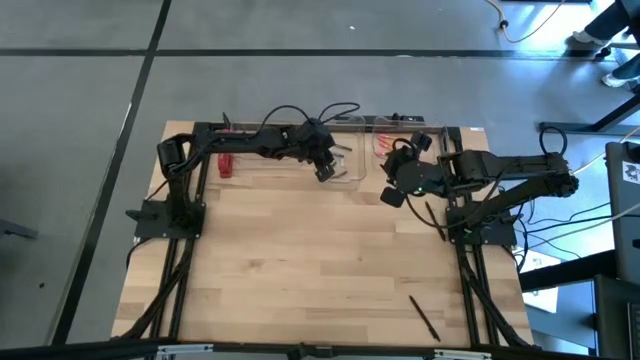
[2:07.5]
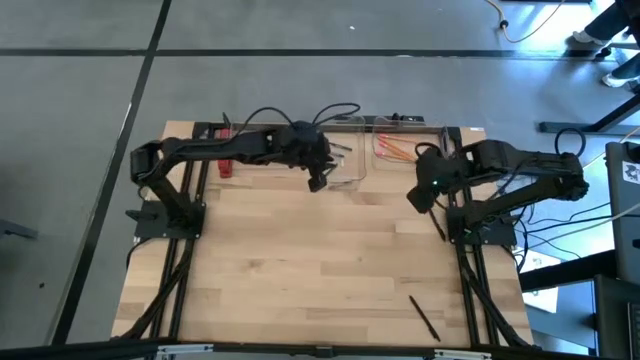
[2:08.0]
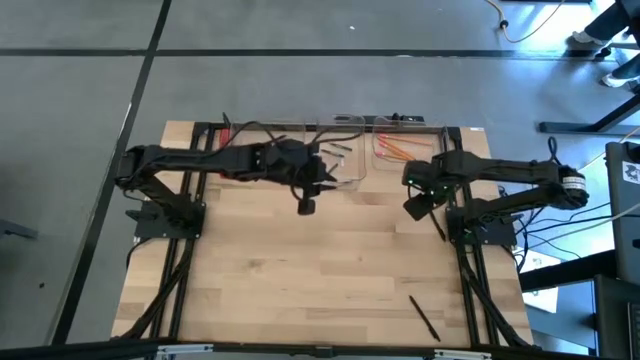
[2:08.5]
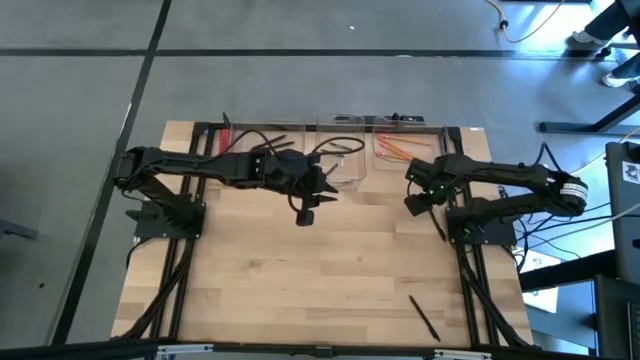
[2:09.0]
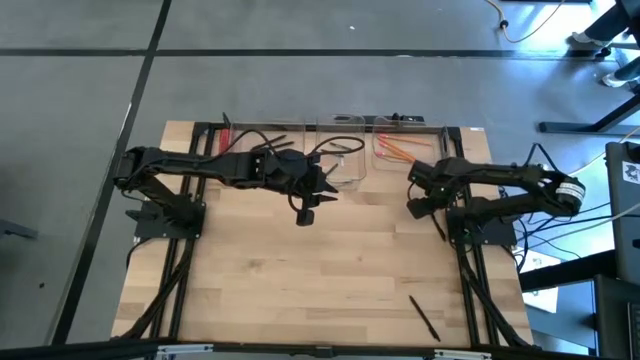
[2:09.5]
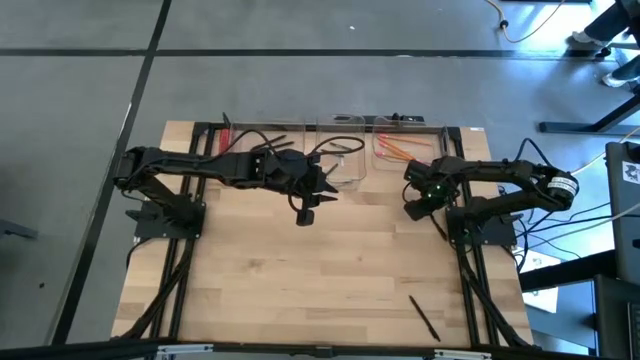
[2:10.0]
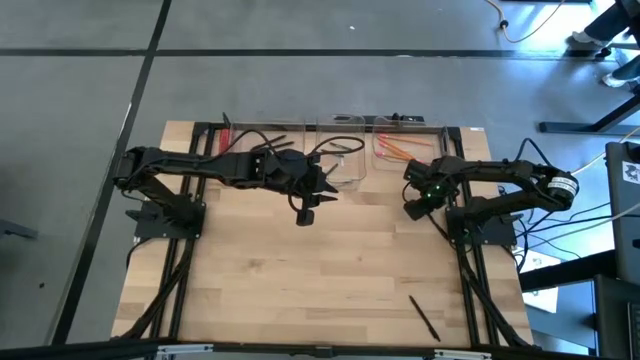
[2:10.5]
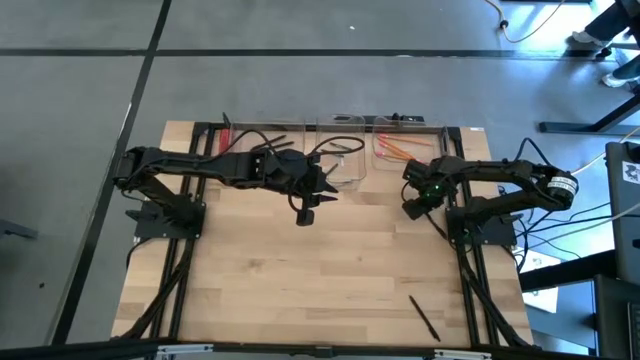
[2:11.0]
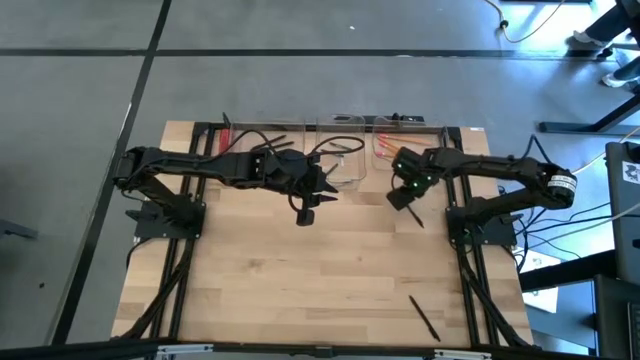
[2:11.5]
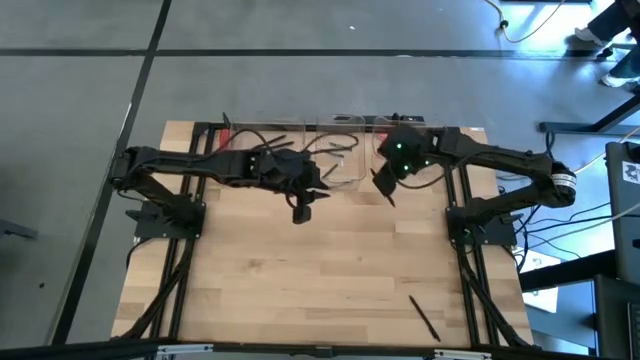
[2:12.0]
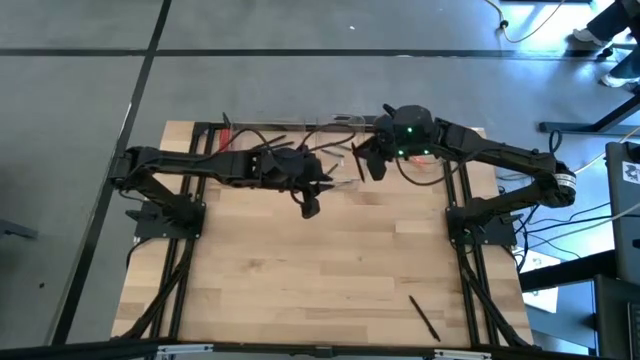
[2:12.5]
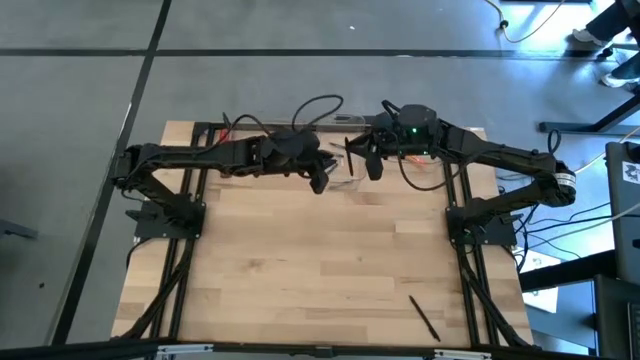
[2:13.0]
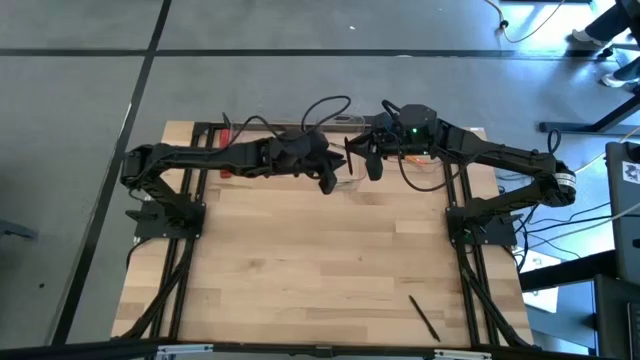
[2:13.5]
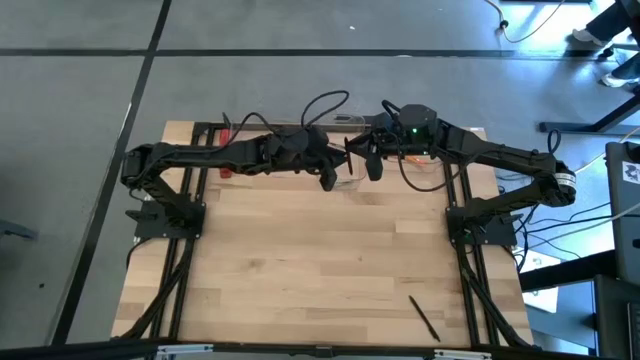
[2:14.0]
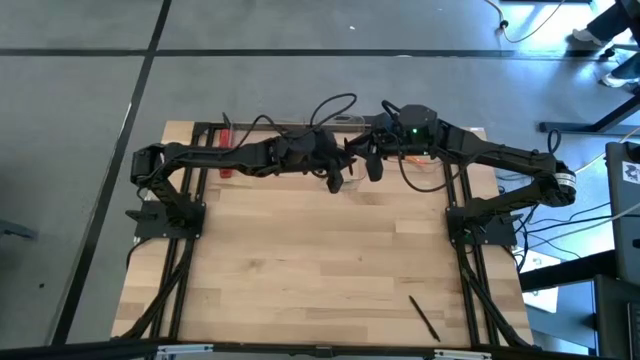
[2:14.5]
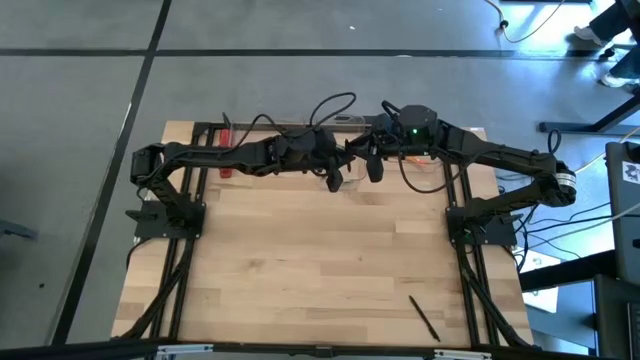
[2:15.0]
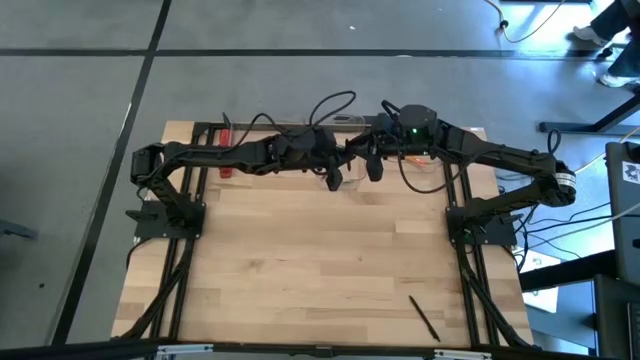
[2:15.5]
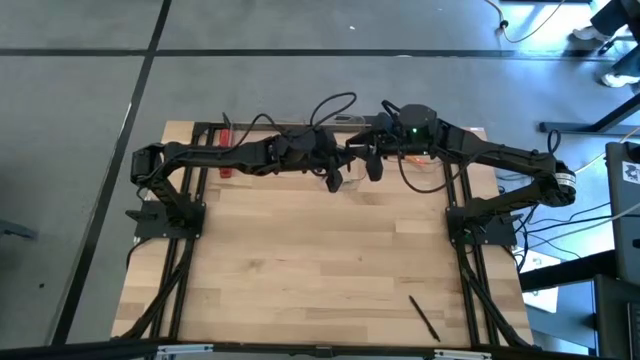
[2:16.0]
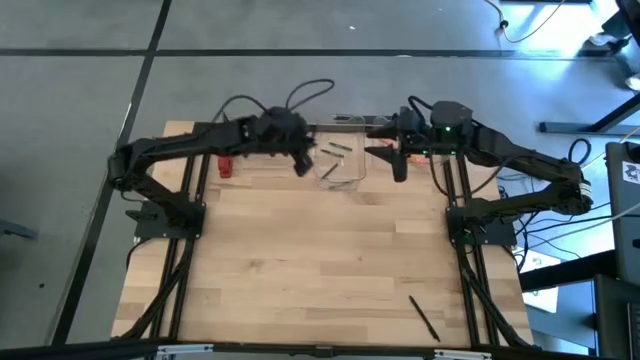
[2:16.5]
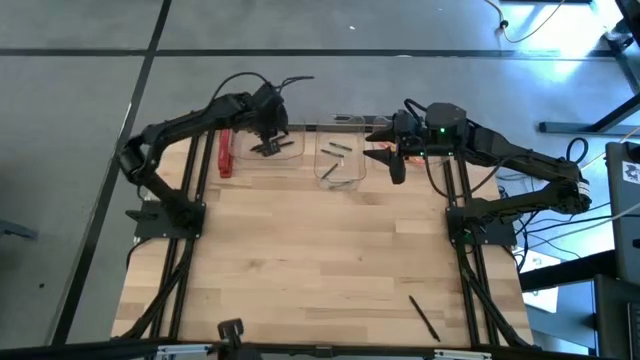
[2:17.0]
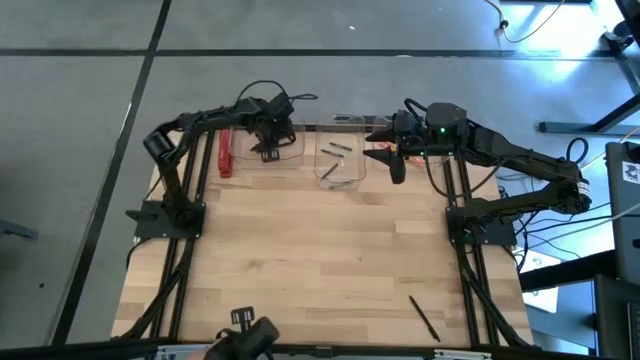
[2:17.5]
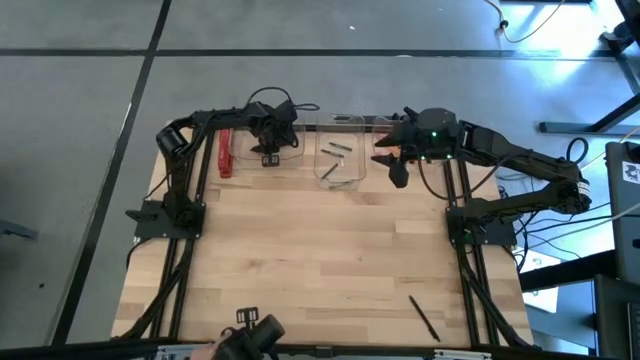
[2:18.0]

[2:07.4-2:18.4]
Task: Sort crayons/erasers/pens/pencils in bins
Put the black pen into the left transparent bin

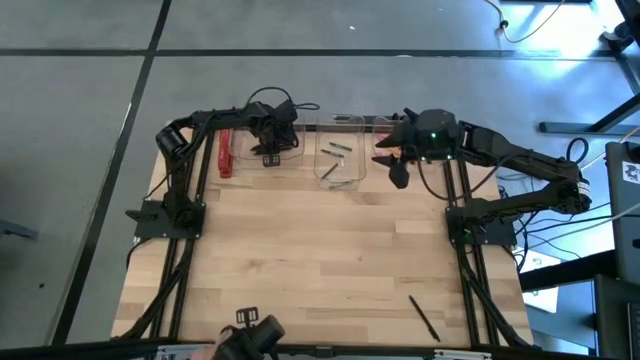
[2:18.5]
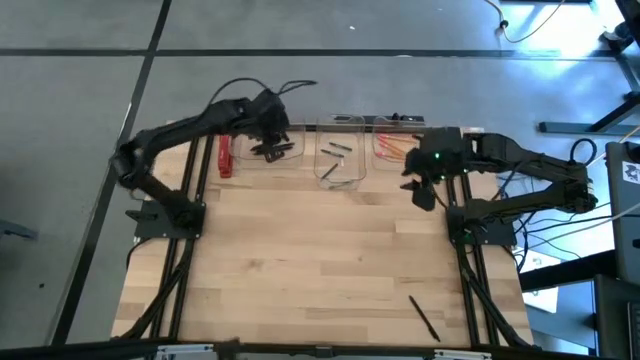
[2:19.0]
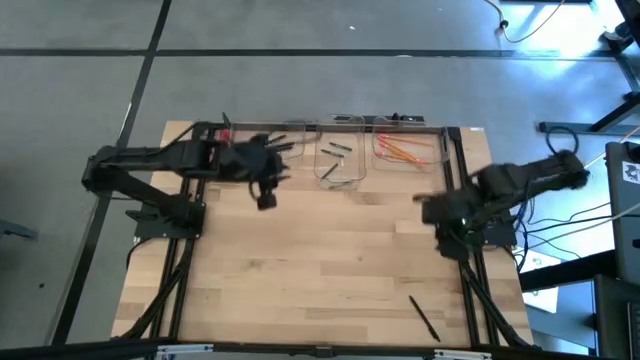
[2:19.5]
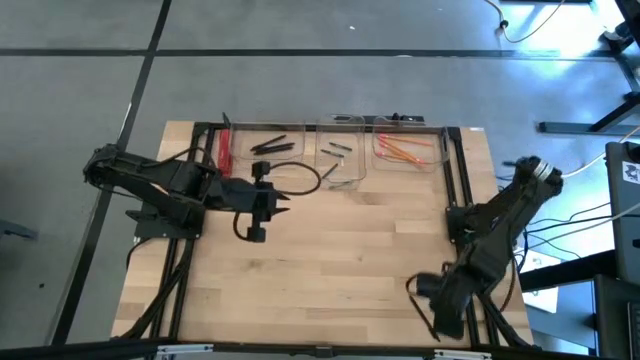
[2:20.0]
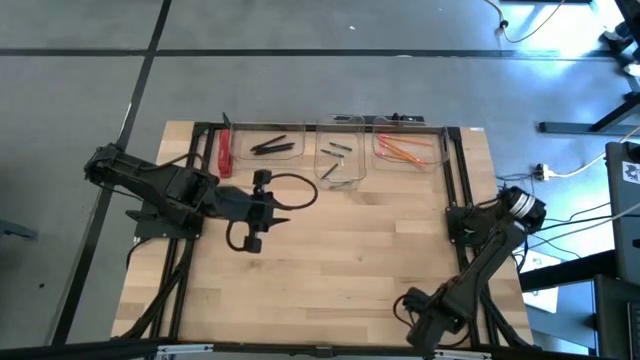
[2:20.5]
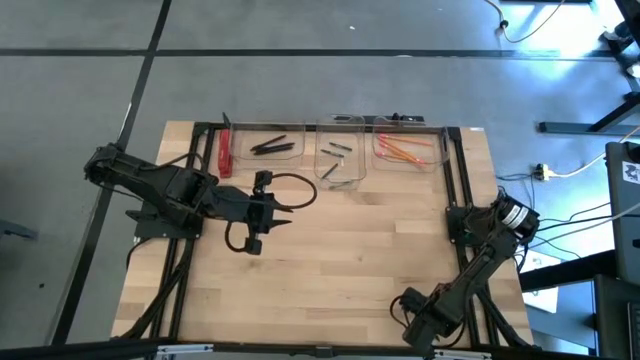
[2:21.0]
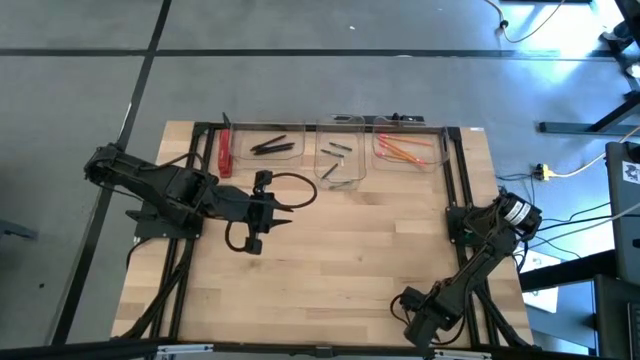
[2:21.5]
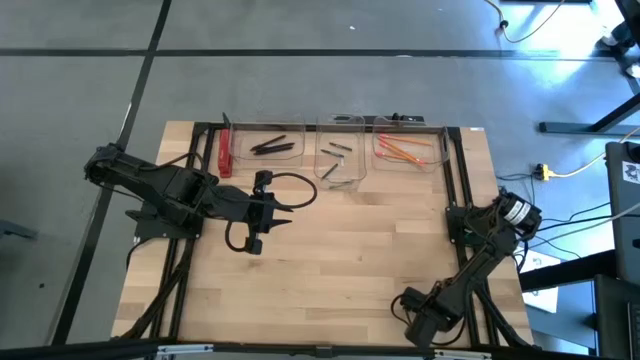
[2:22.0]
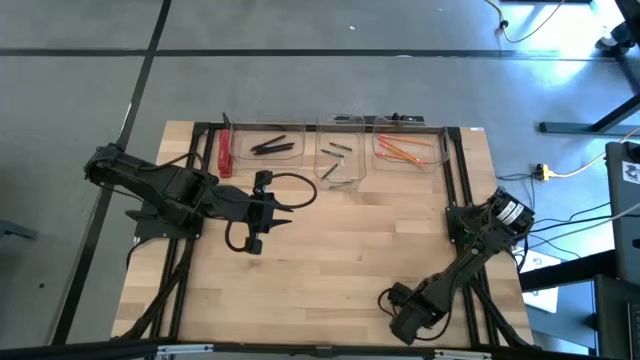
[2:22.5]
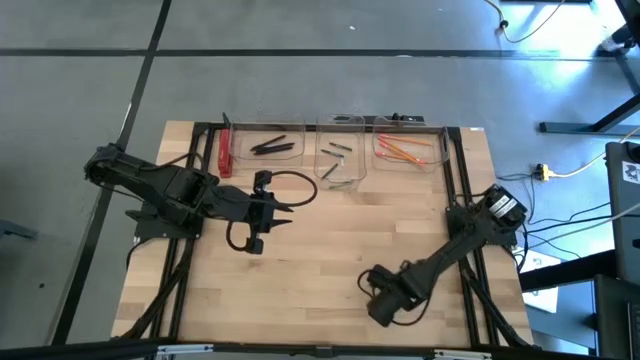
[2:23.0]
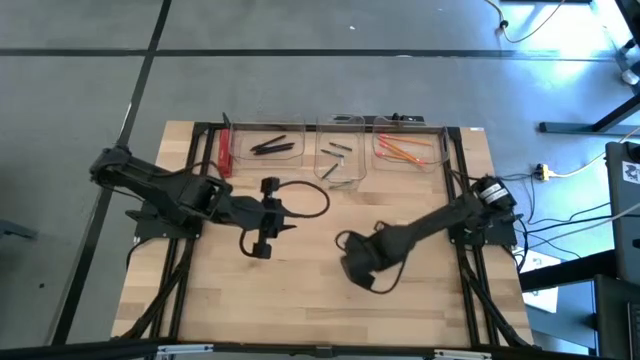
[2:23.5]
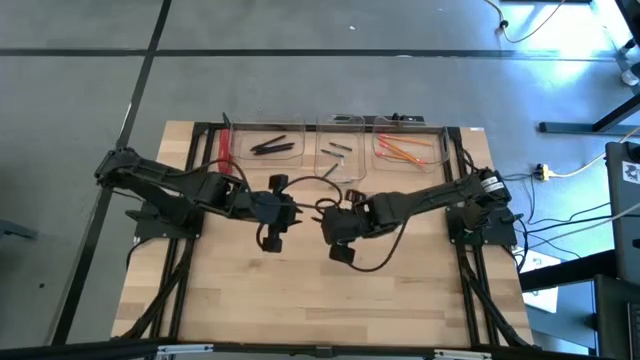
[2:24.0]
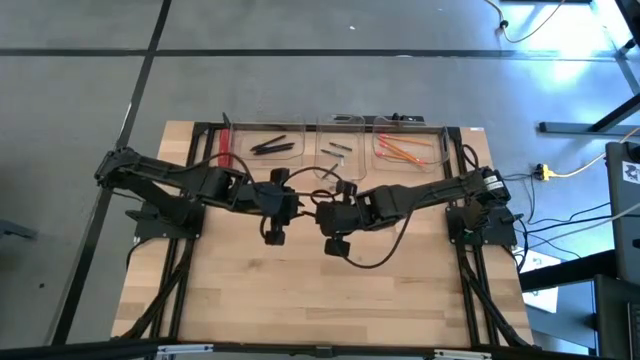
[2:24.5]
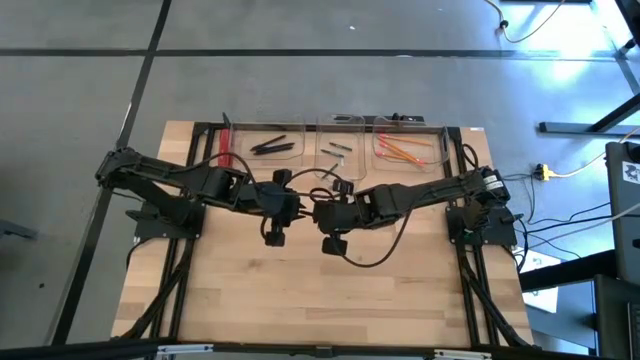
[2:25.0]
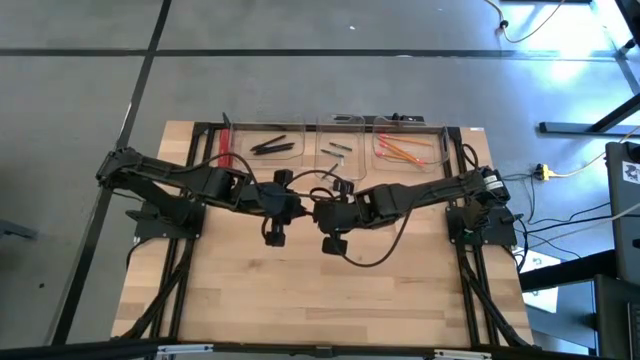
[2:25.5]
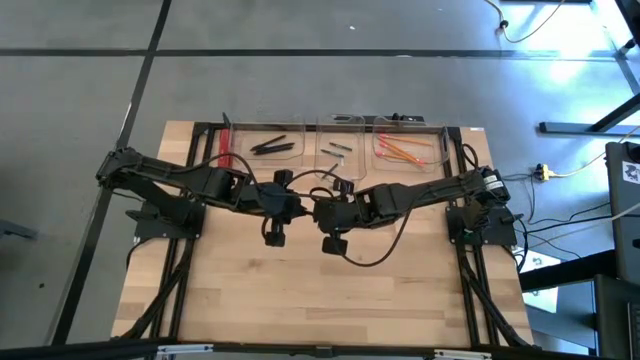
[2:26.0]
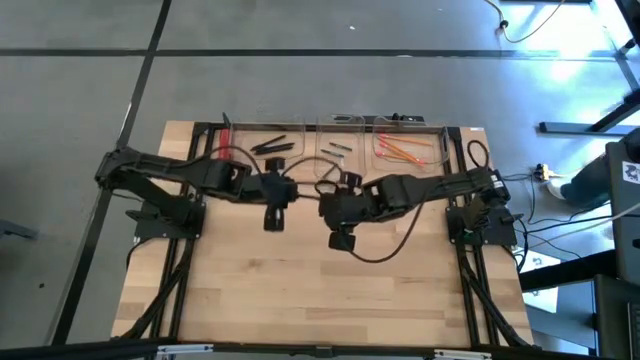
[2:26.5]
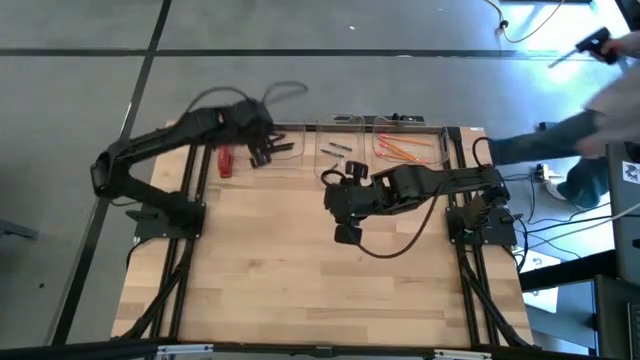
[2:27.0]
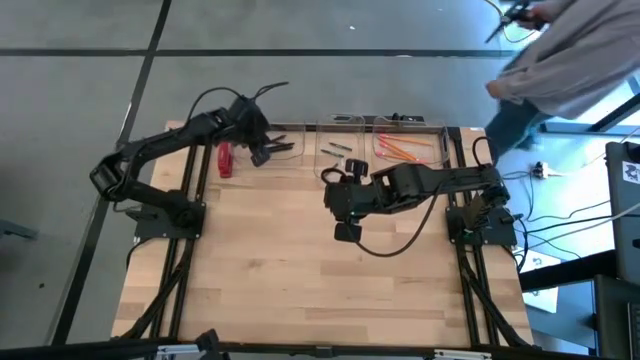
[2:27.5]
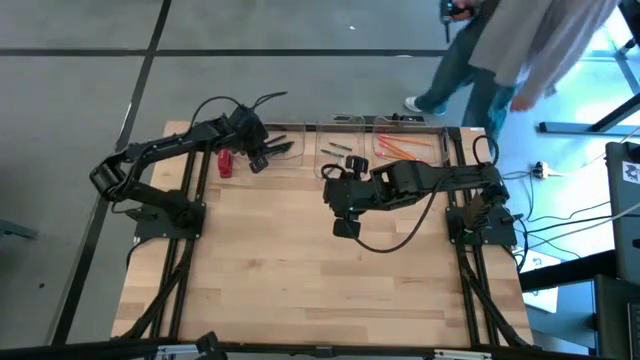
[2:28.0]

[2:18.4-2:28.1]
Put the black pen into the left transparent bin
